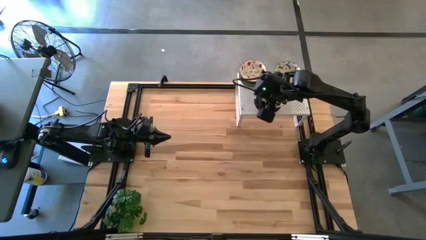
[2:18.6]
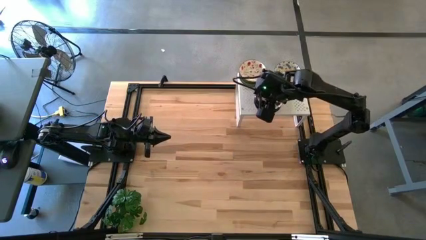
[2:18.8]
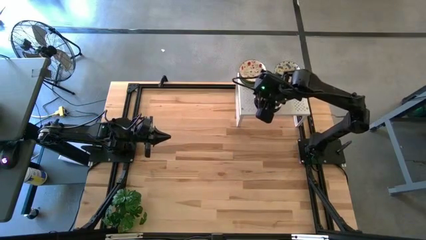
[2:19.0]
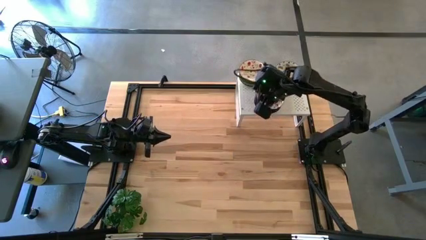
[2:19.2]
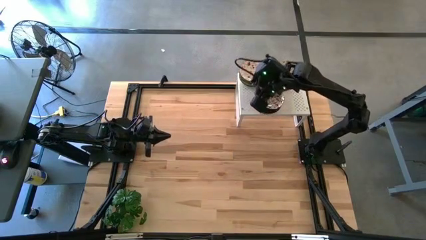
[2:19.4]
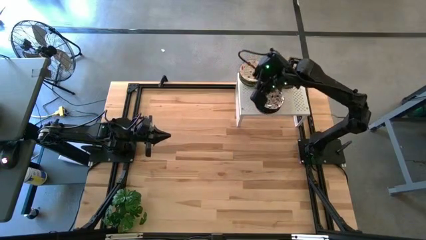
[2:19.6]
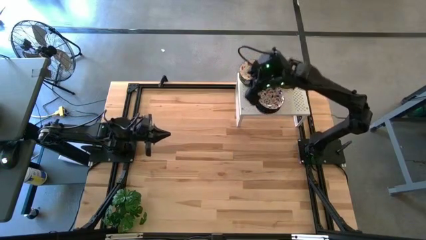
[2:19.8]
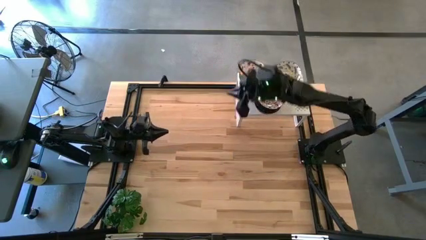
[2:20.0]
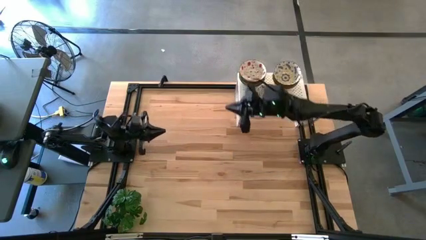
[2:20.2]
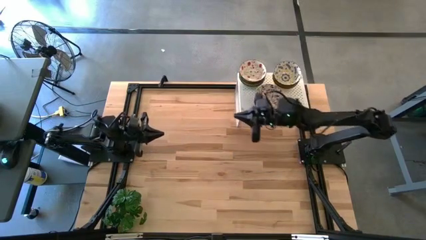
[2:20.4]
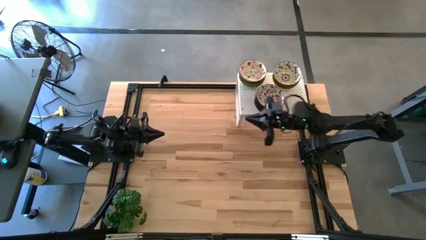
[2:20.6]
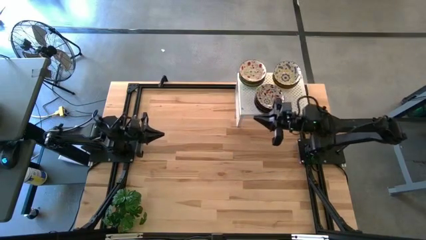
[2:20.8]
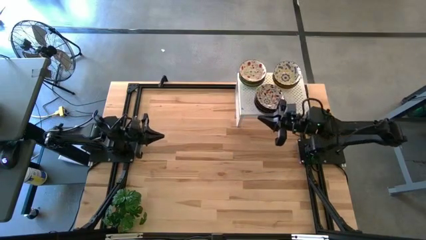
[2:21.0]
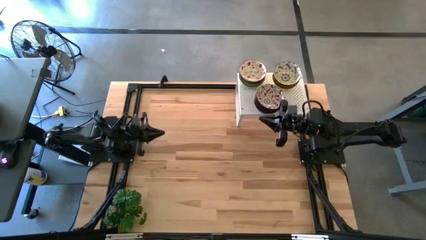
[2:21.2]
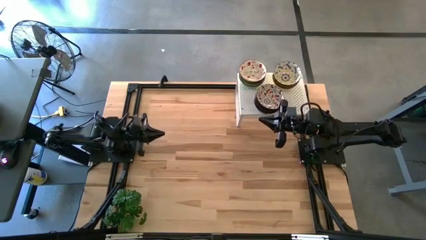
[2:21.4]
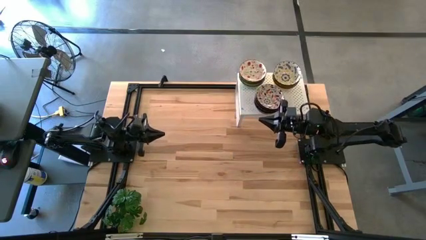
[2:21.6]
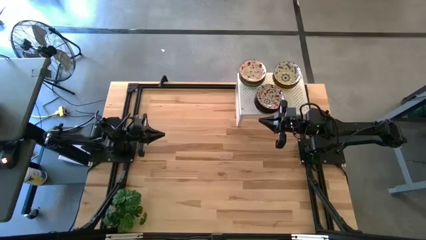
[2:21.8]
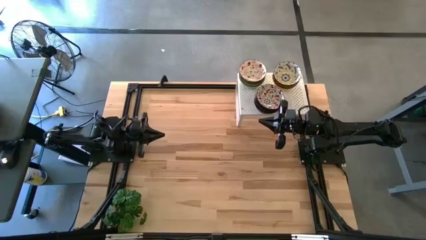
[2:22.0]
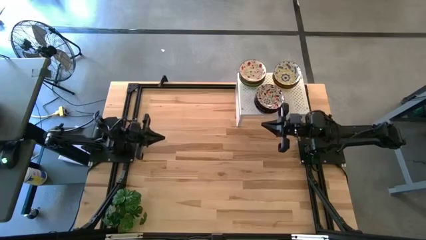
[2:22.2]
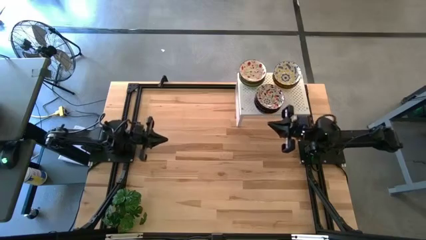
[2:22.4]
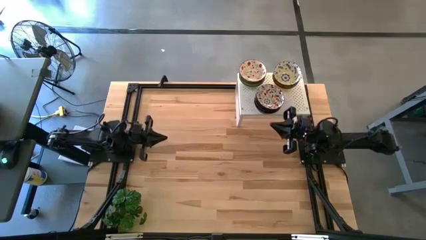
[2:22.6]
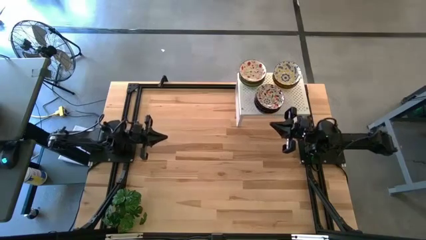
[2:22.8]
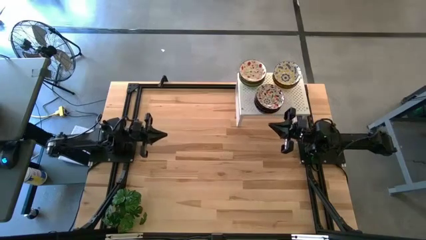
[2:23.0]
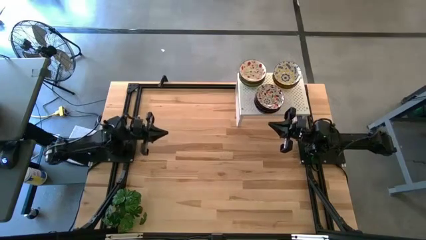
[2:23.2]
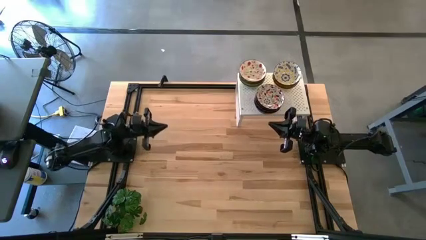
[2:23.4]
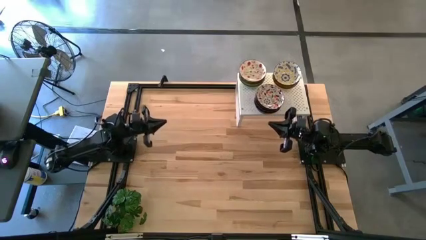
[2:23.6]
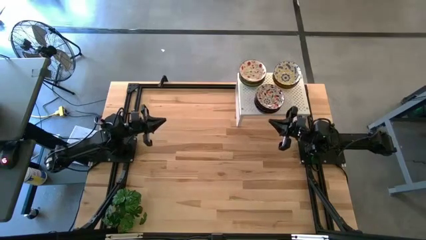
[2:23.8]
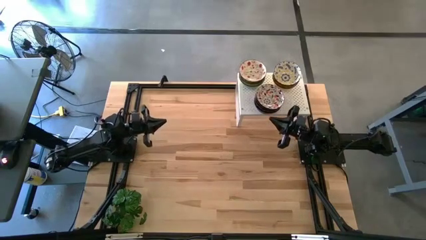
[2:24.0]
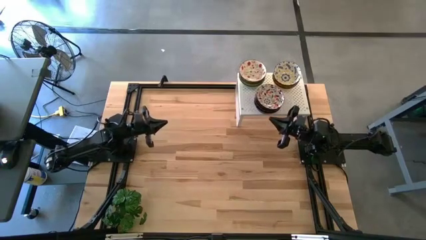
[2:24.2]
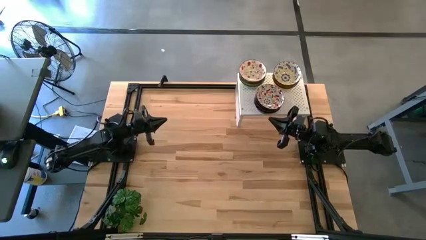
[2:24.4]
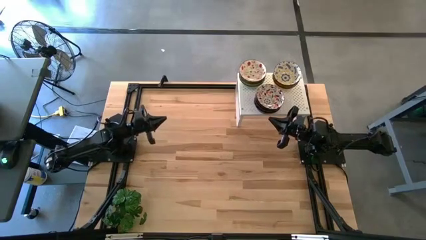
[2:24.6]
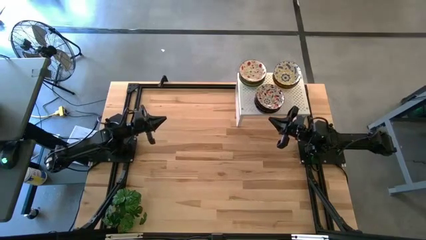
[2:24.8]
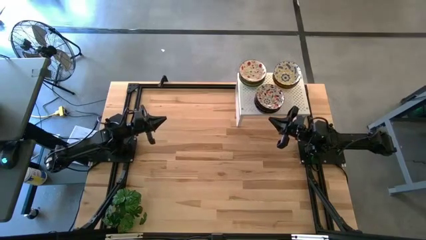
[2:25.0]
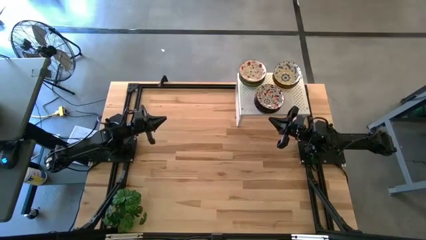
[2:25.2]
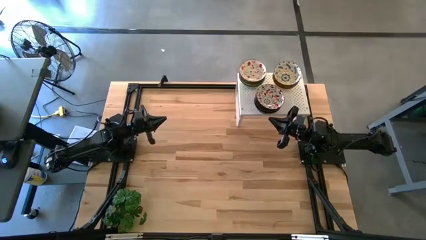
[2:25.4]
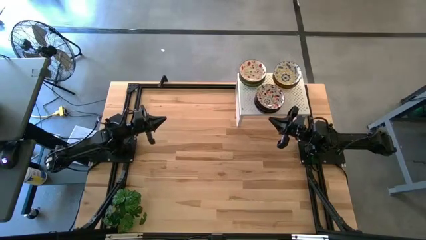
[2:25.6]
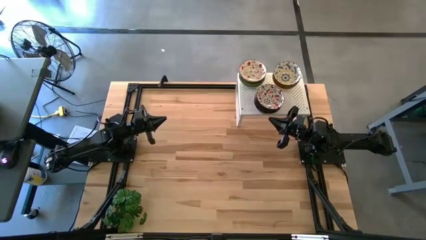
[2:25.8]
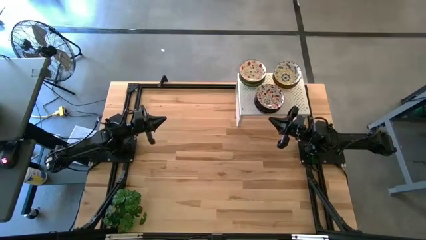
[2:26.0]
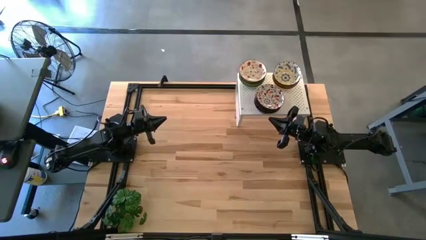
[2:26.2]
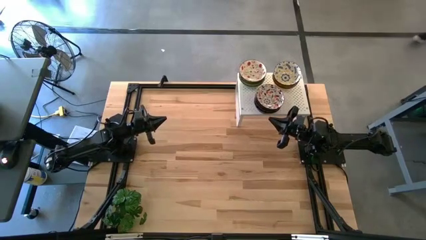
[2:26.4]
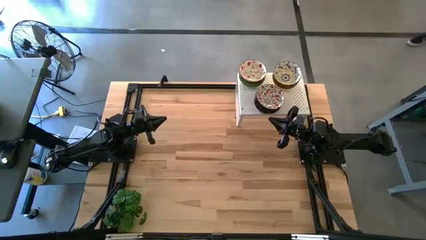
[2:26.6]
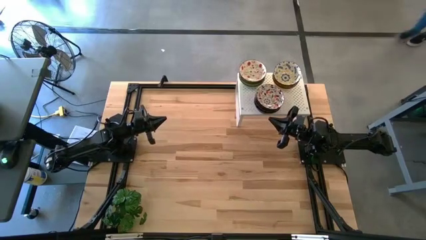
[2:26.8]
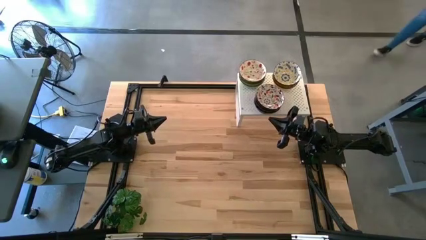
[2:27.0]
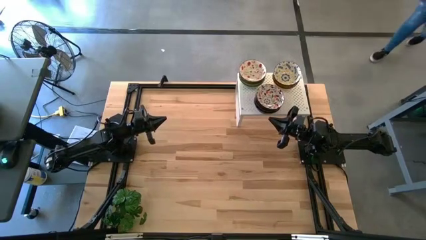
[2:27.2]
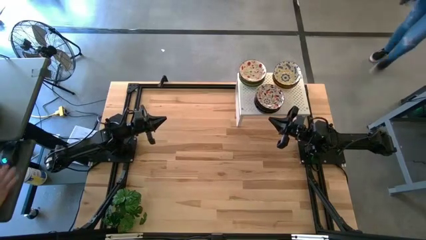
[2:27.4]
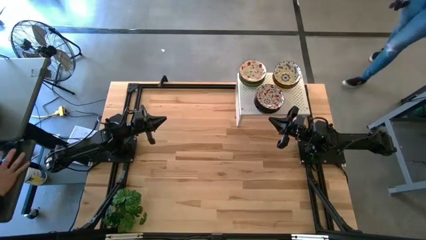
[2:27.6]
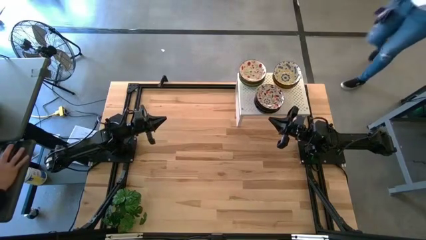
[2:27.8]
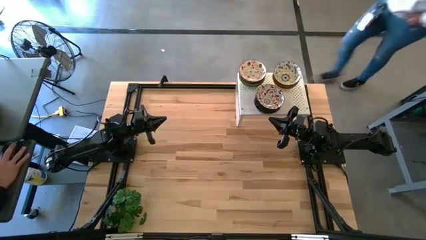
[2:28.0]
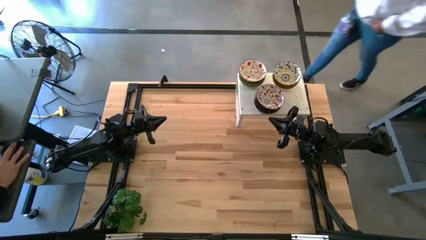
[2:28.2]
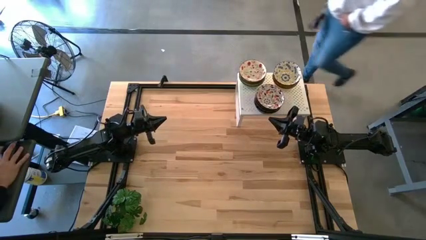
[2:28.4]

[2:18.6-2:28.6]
Task: Pick & Place Mini bowls
Return to Home Position

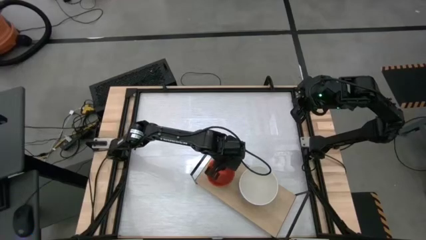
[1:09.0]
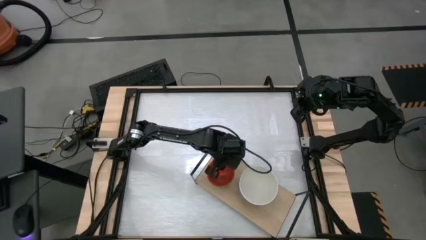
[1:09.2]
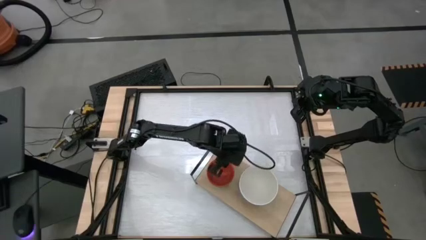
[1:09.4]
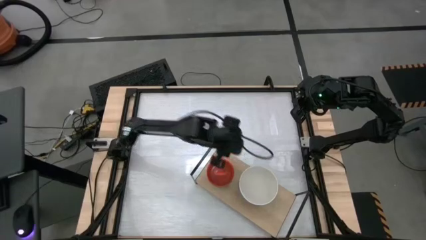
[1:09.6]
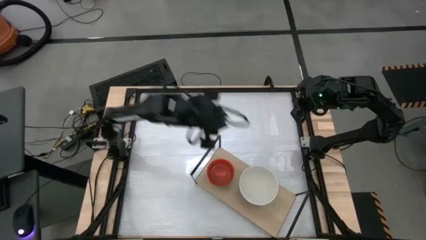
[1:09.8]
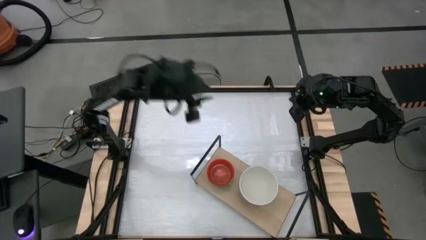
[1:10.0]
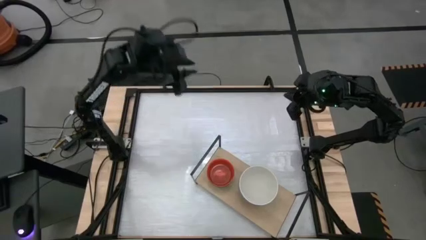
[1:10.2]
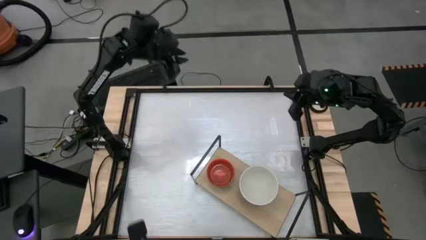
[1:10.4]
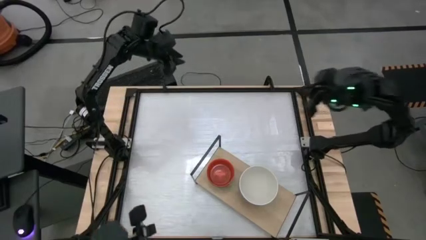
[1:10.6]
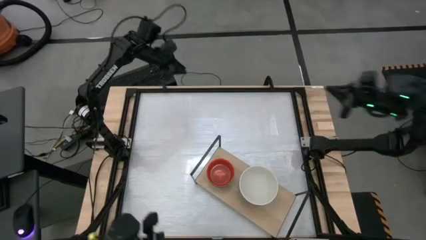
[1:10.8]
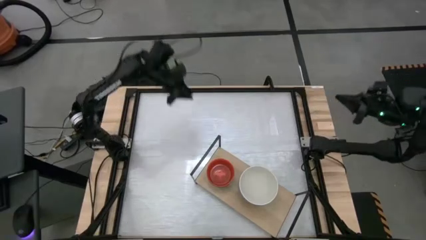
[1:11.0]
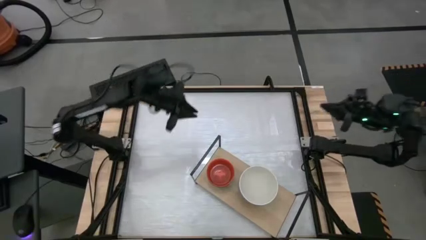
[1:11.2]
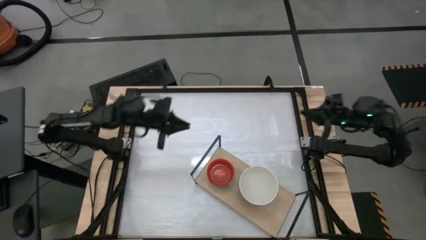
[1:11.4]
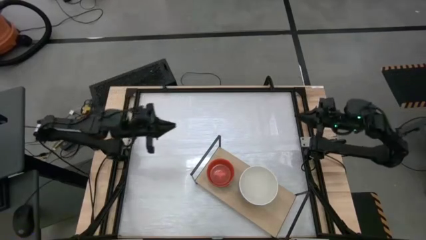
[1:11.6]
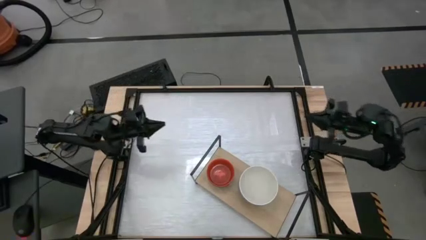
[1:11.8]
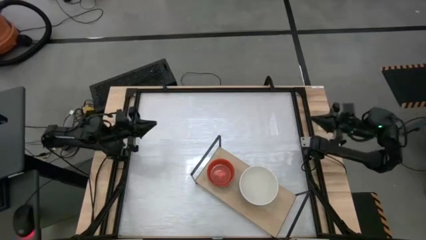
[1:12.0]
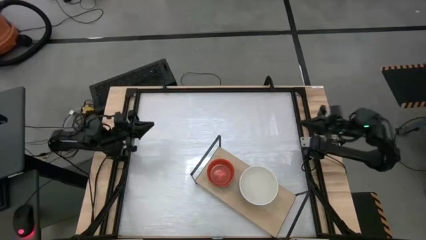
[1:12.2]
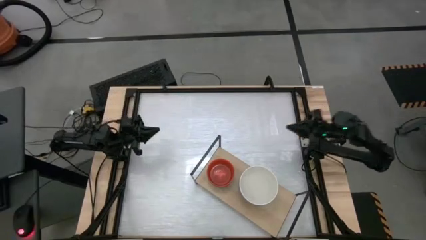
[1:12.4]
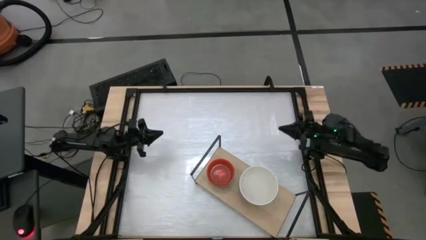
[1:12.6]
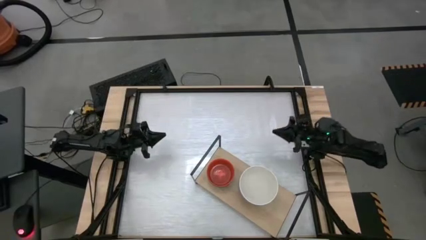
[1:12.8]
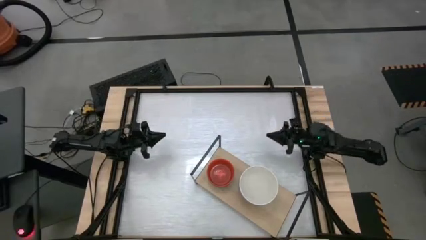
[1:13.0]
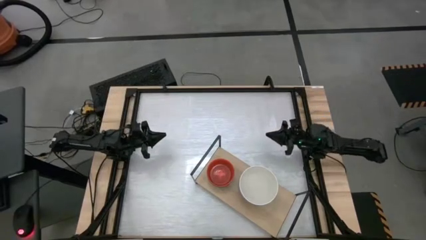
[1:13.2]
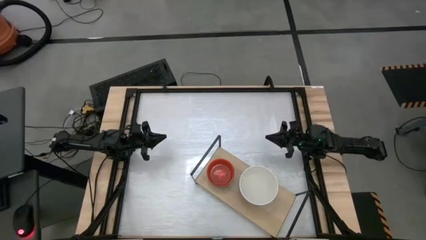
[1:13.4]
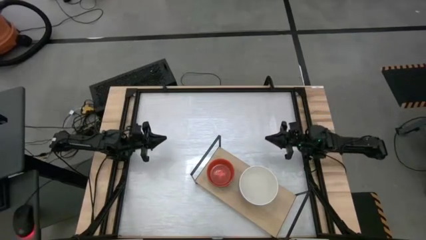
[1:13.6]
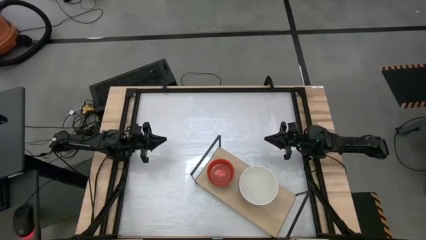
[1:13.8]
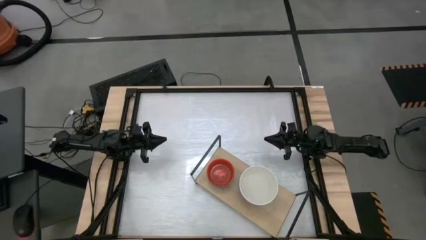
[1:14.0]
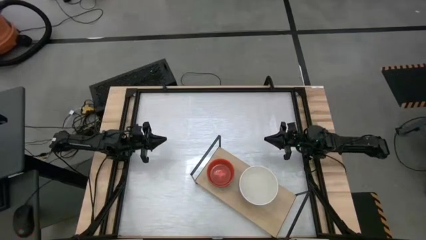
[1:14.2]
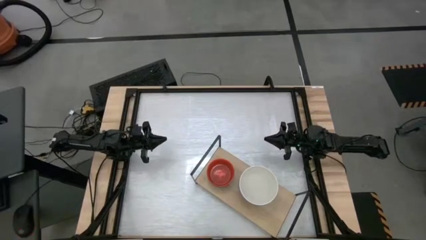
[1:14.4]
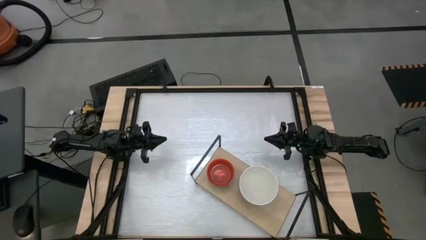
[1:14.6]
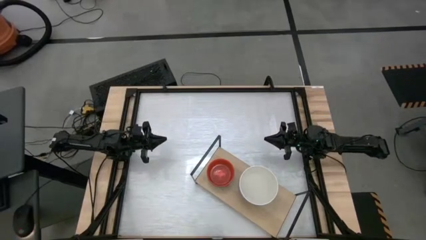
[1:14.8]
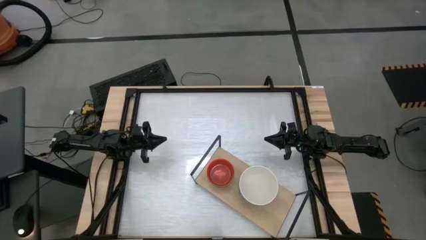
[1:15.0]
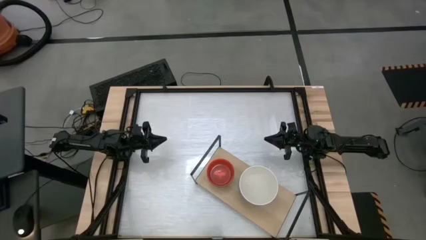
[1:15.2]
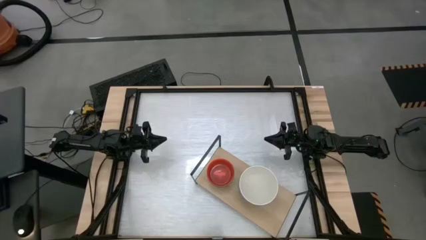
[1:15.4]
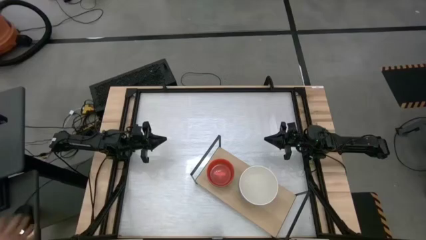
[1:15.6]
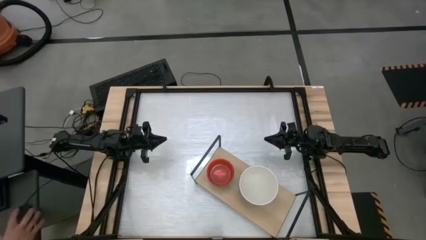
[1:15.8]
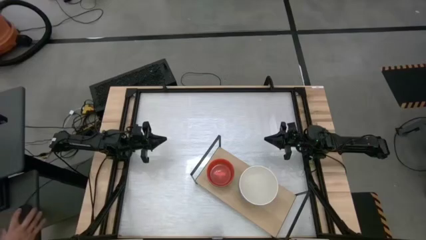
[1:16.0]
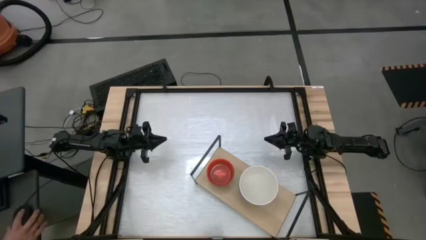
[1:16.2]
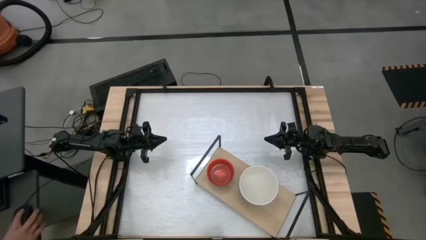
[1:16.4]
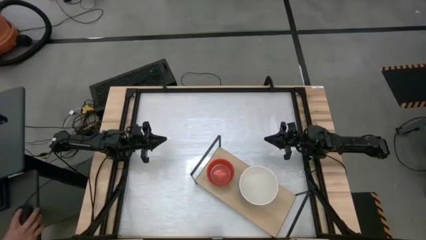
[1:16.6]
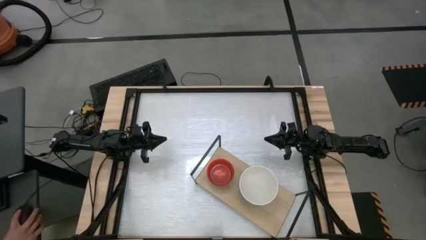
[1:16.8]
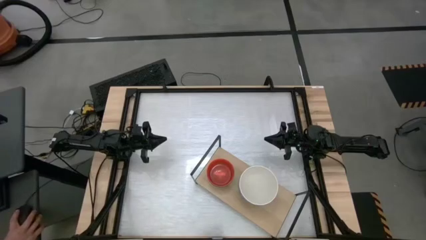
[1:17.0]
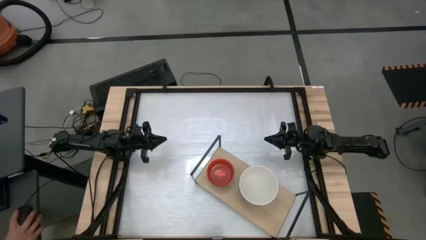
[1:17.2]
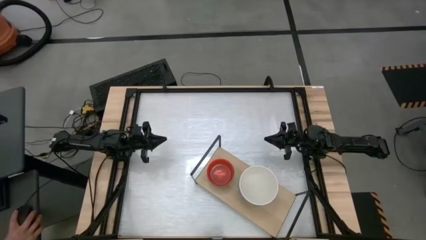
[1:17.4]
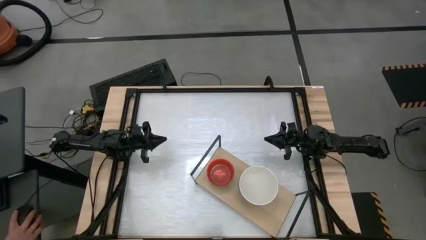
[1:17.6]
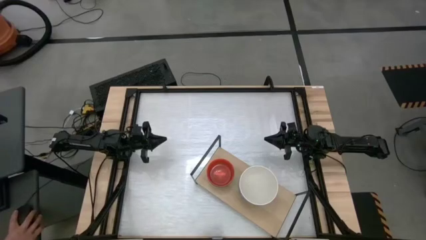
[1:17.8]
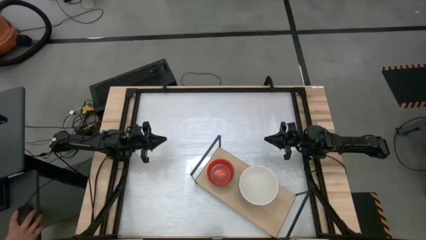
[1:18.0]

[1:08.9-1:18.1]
Task: Place and stack bowls onto a shelf
Return to Home Position
